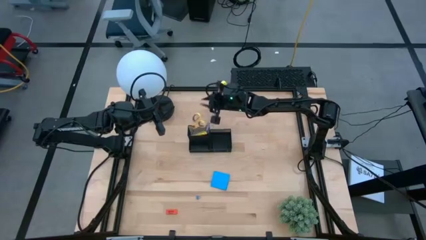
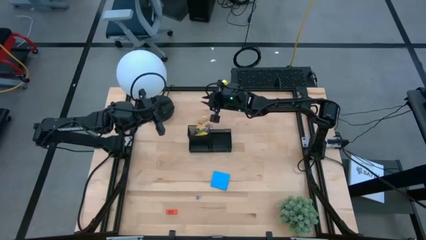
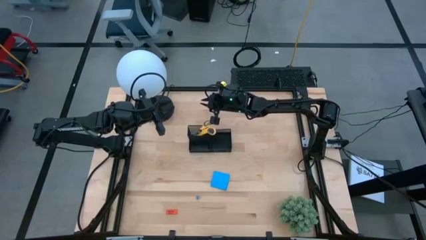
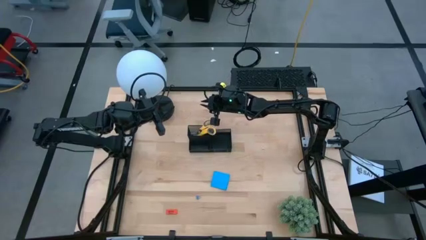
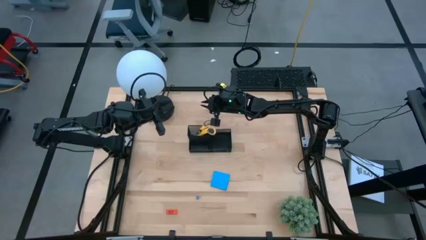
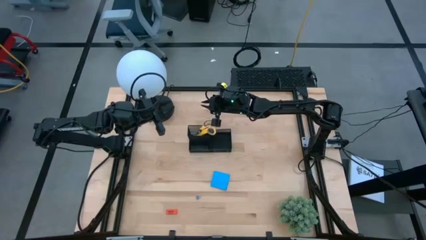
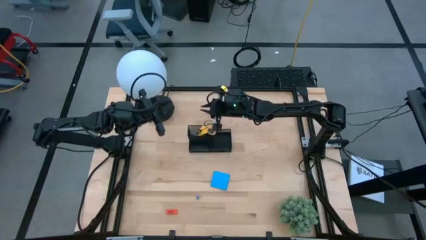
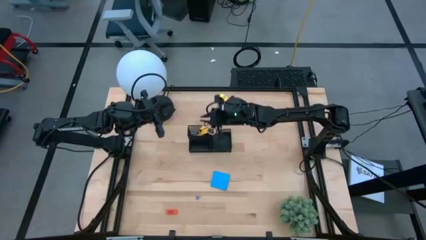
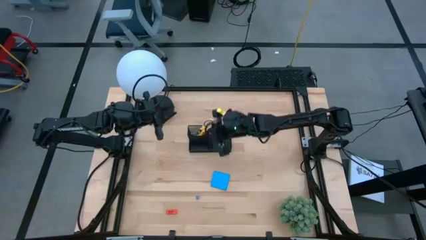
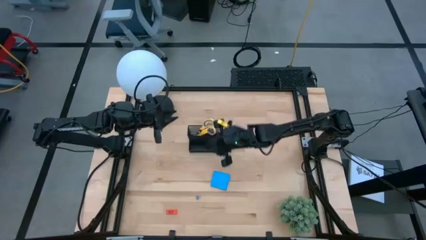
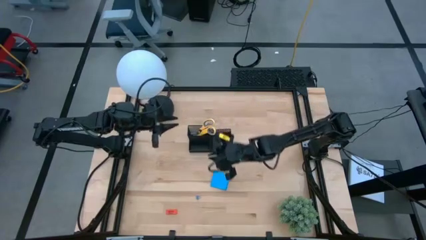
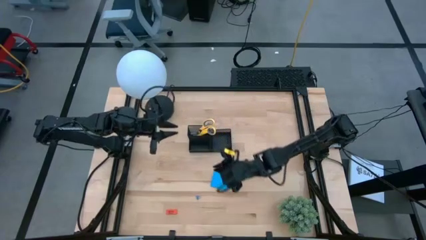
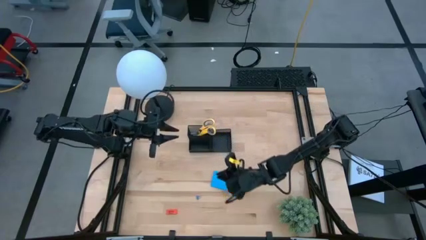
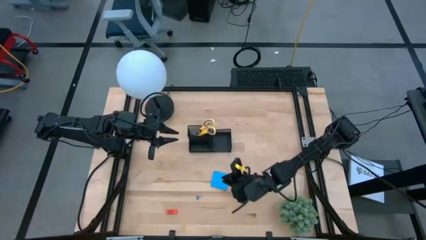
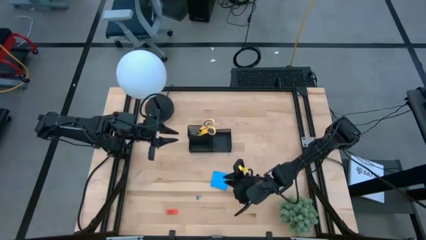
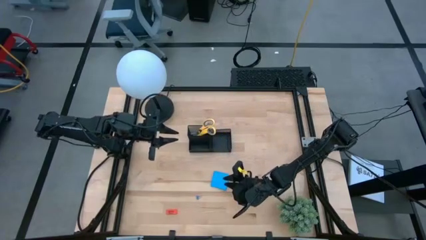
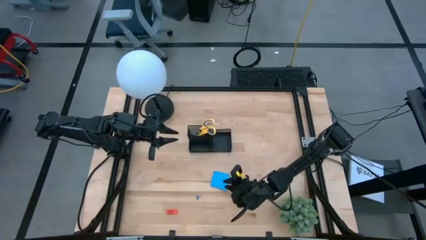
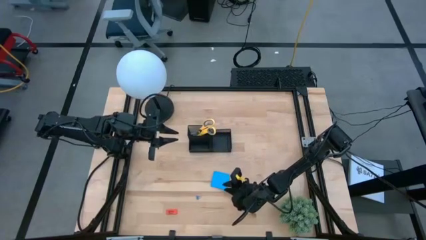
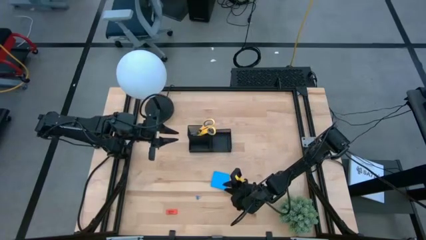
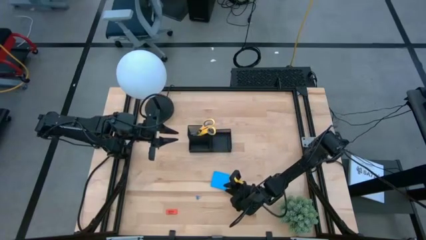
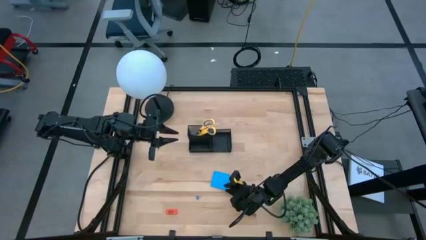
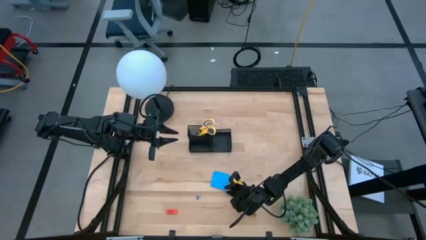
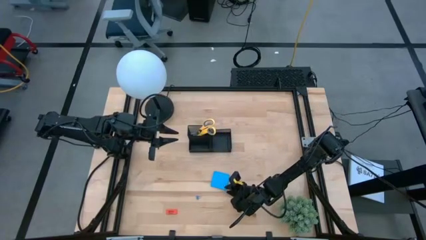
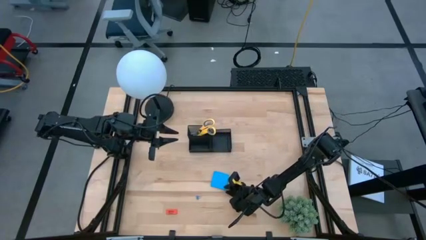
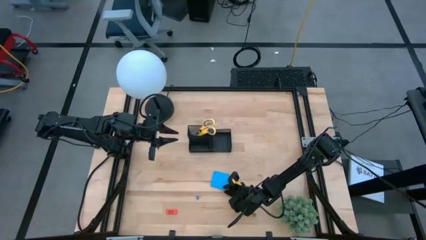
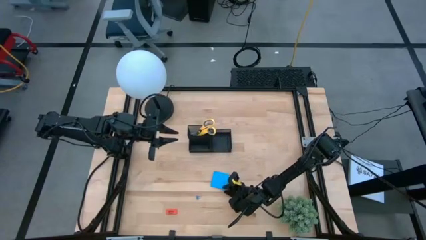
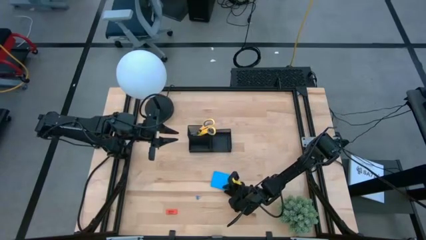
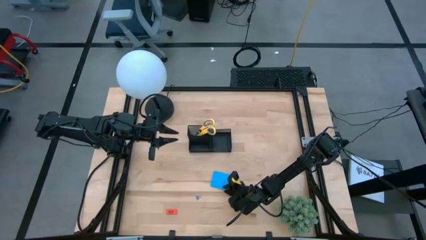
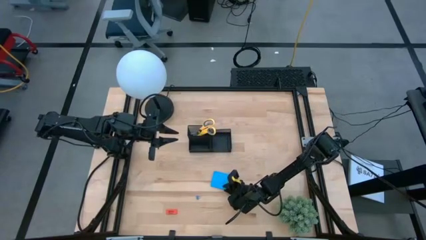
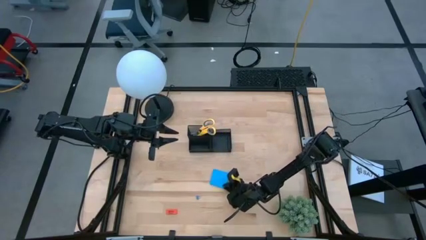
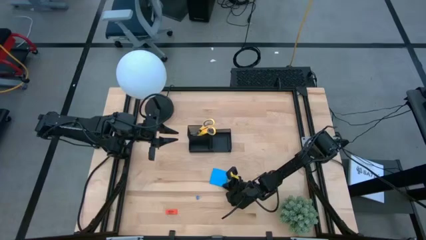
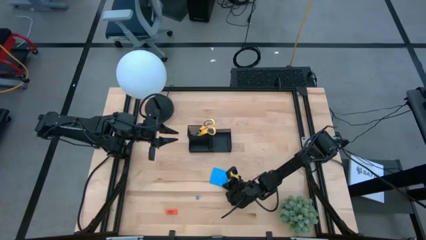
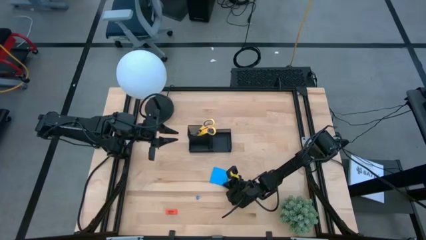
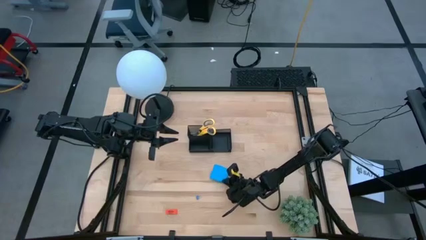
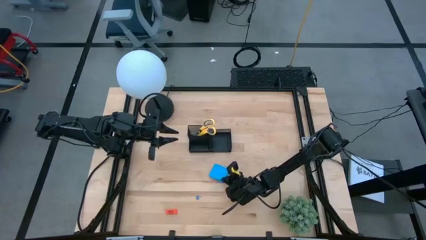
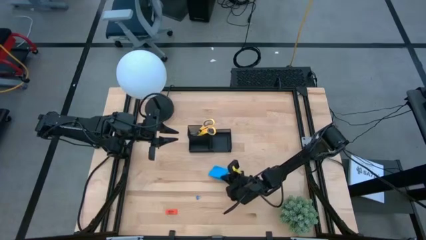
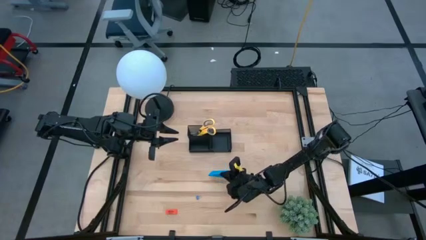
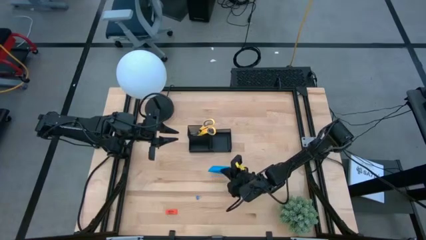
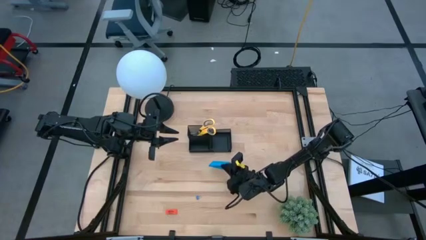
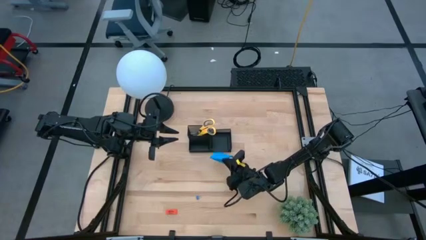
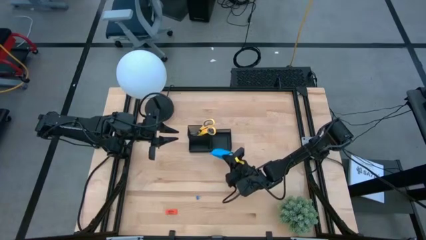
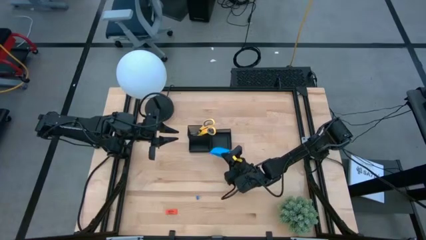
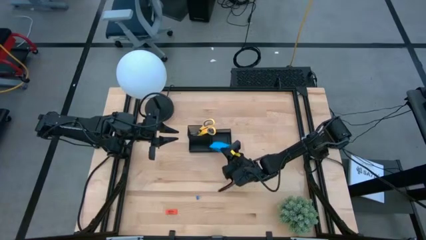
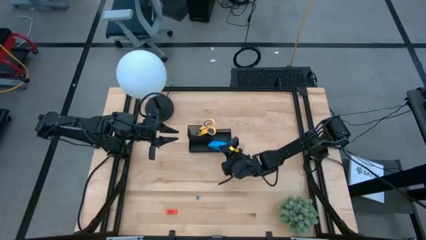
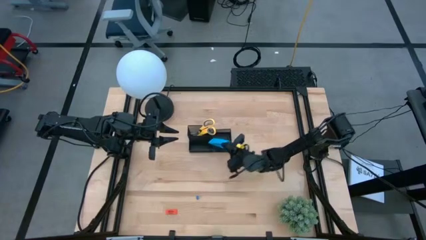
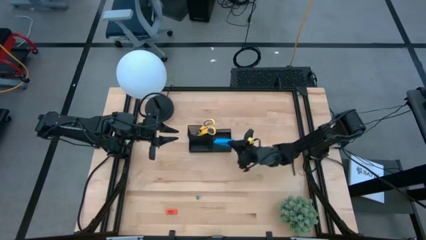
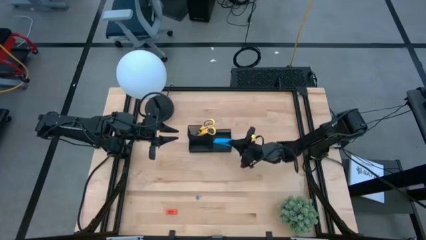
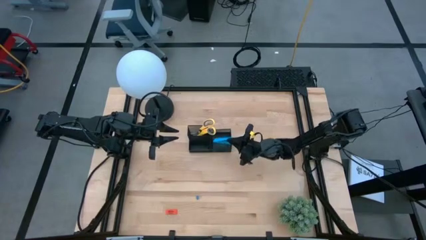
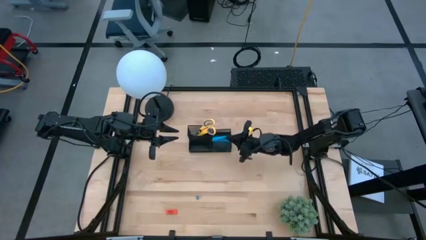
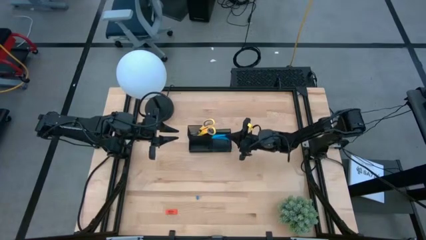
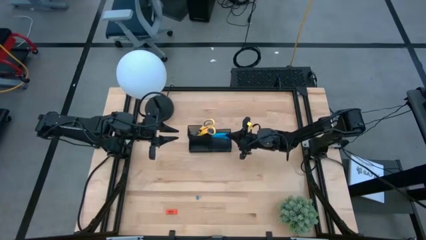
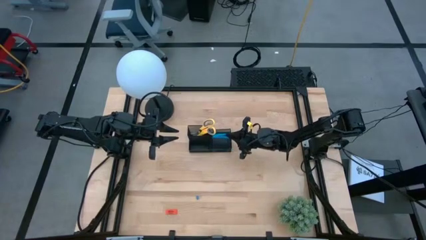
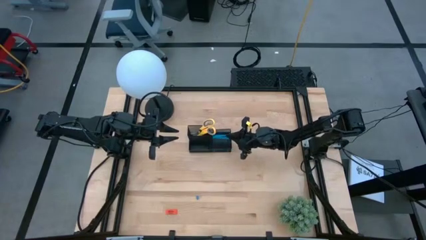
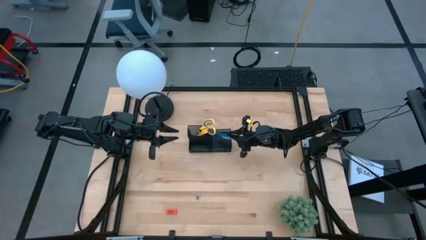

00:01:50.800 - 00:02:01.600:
Task: Pick and place office supplies into organizer
Put the blue sticky note into the black mesh desk organizer
